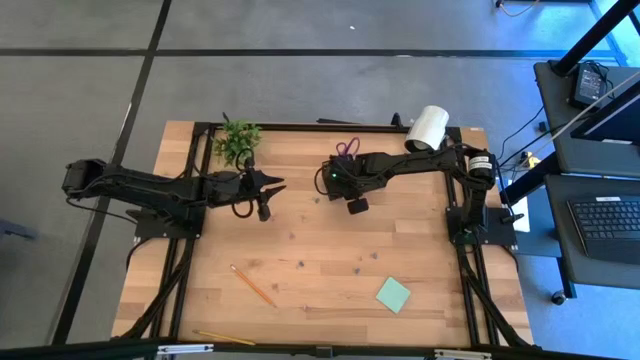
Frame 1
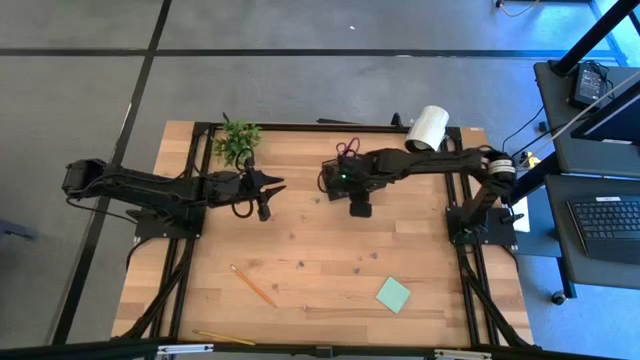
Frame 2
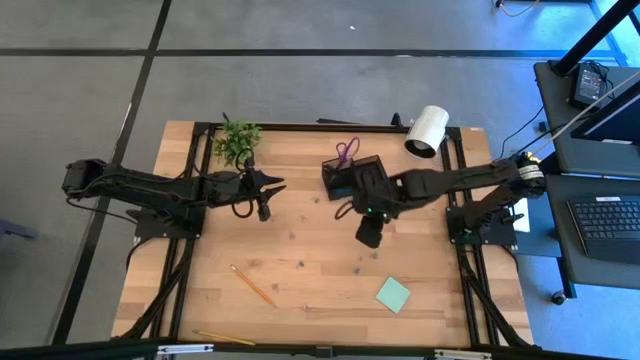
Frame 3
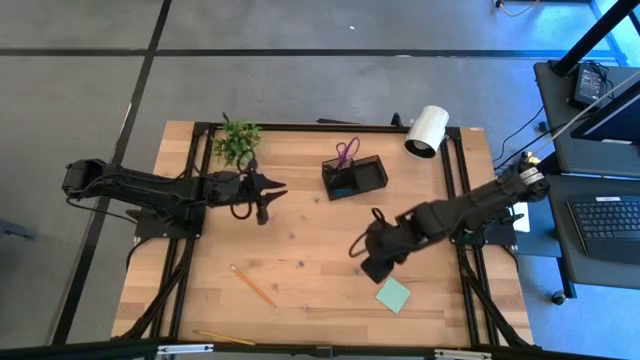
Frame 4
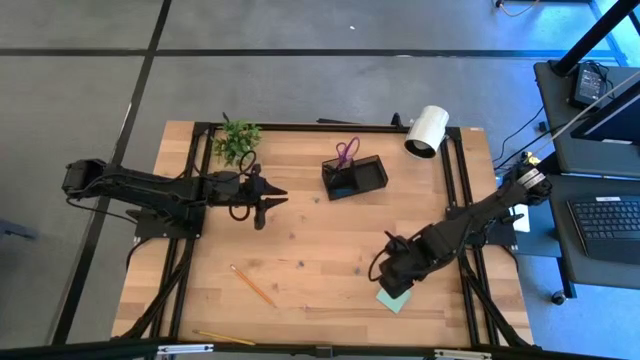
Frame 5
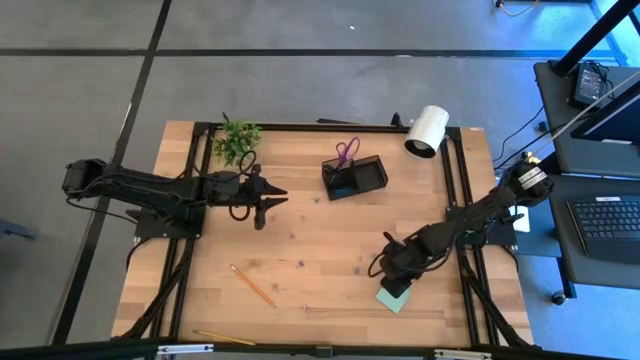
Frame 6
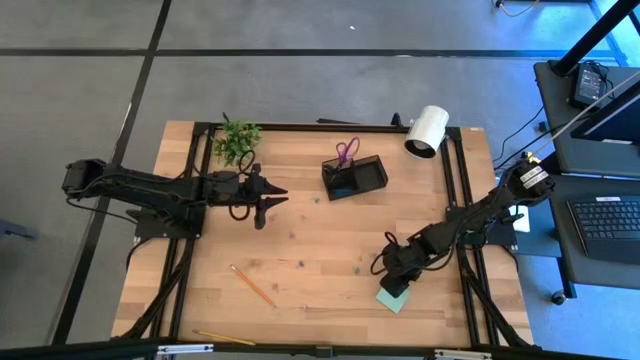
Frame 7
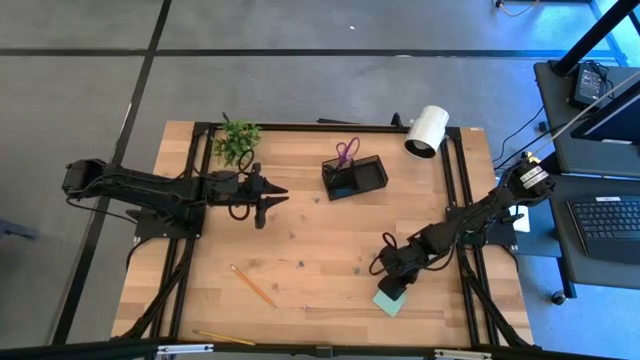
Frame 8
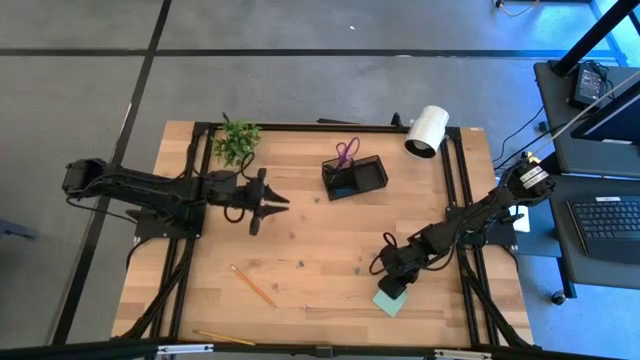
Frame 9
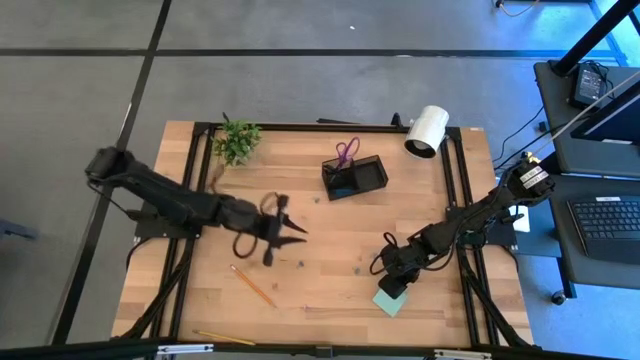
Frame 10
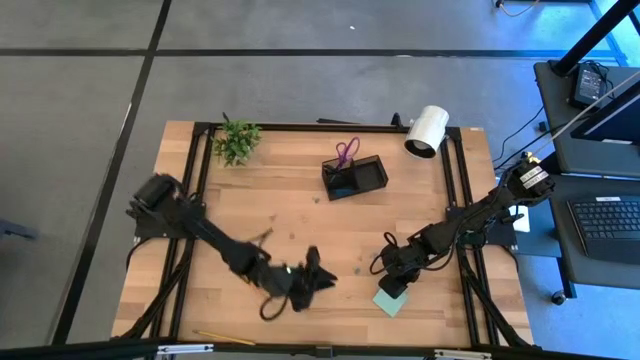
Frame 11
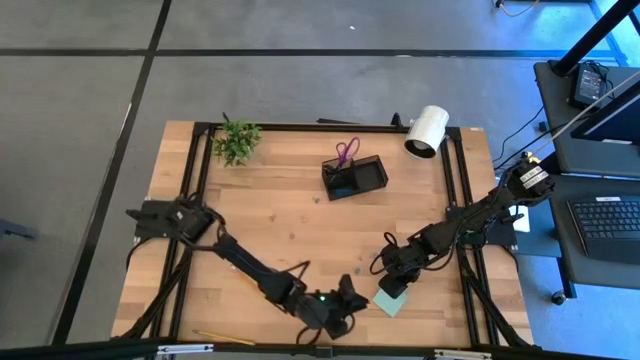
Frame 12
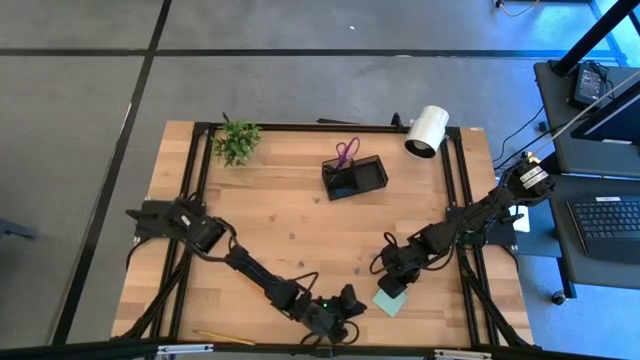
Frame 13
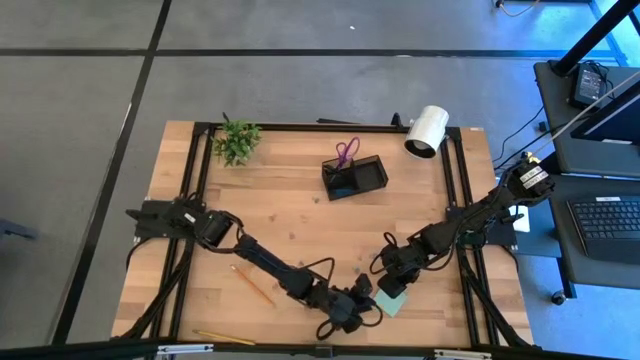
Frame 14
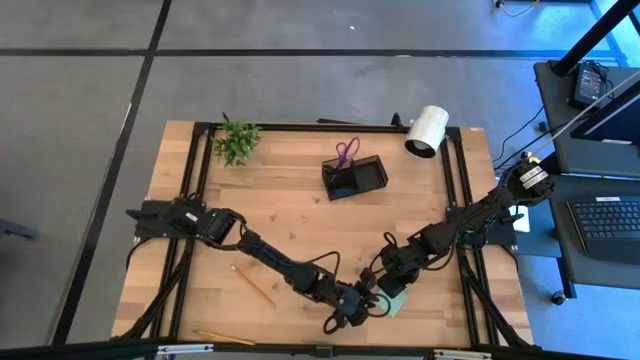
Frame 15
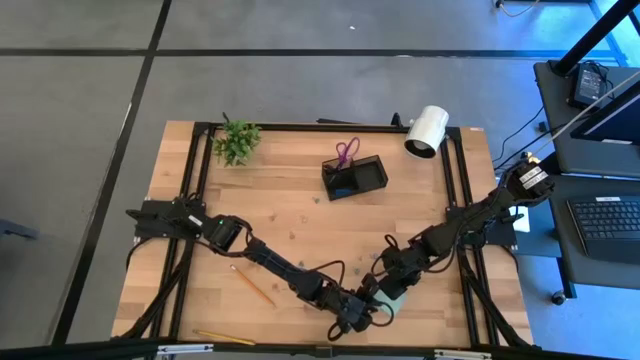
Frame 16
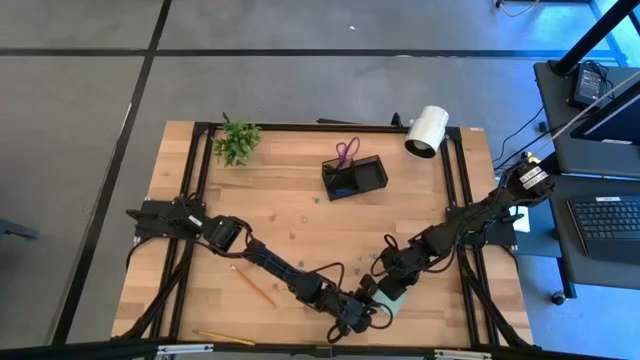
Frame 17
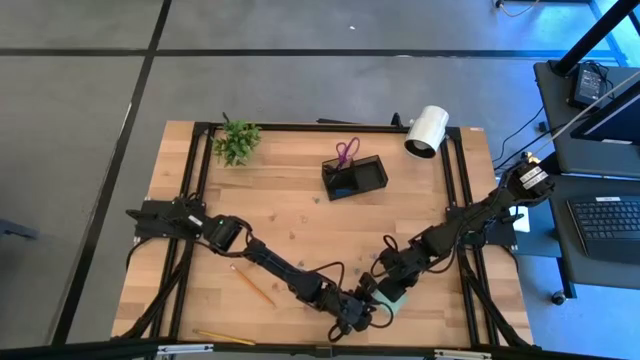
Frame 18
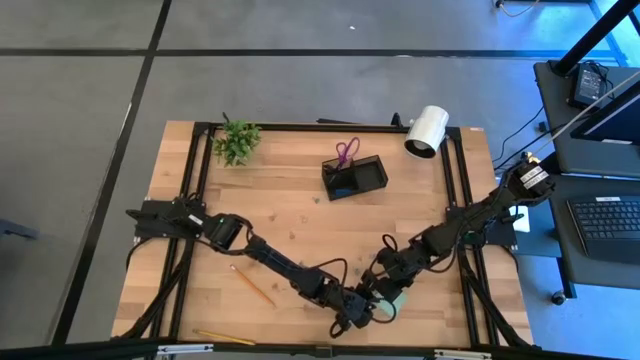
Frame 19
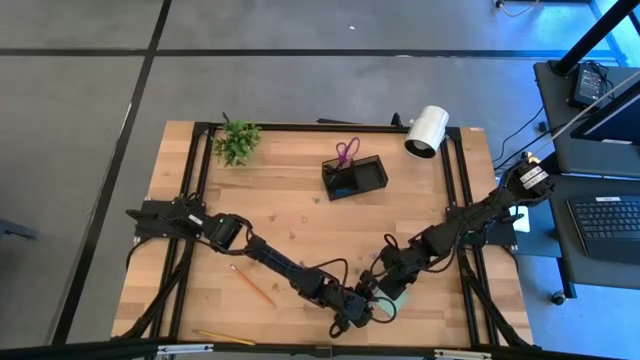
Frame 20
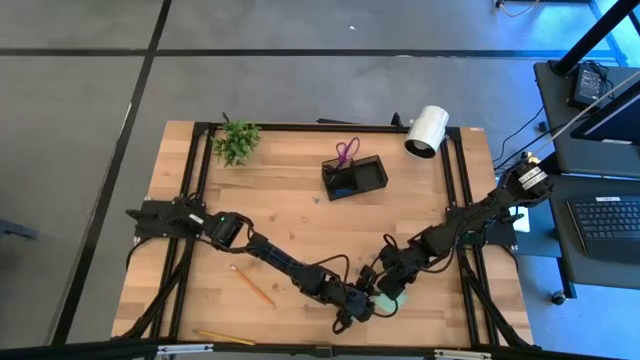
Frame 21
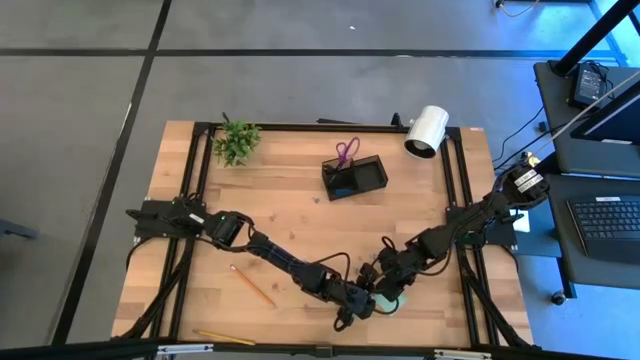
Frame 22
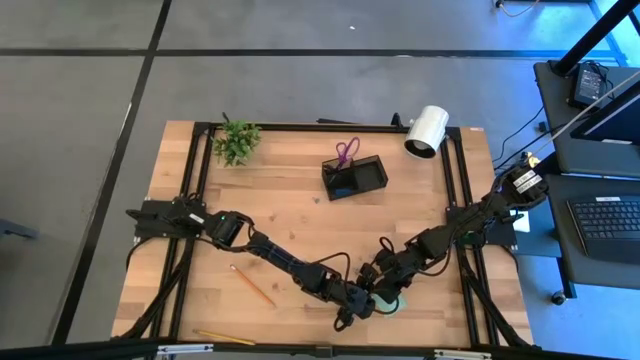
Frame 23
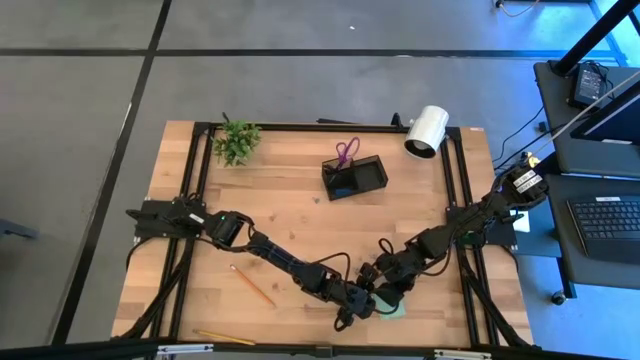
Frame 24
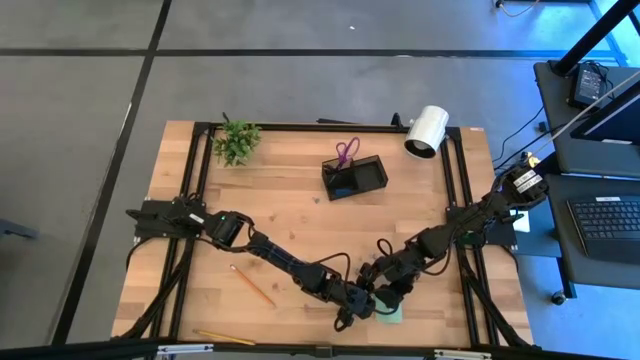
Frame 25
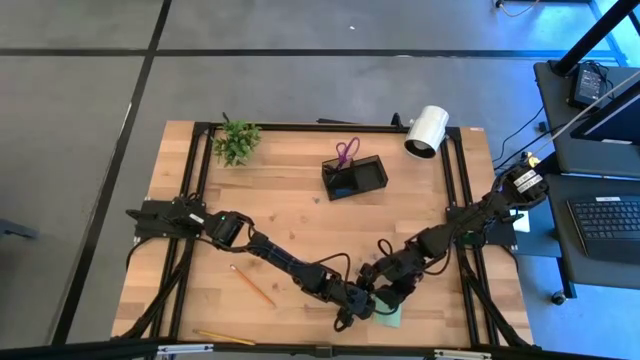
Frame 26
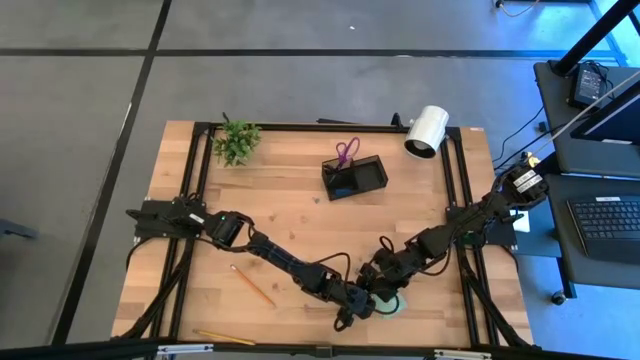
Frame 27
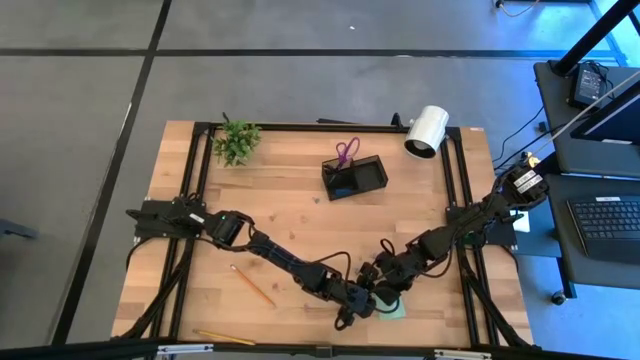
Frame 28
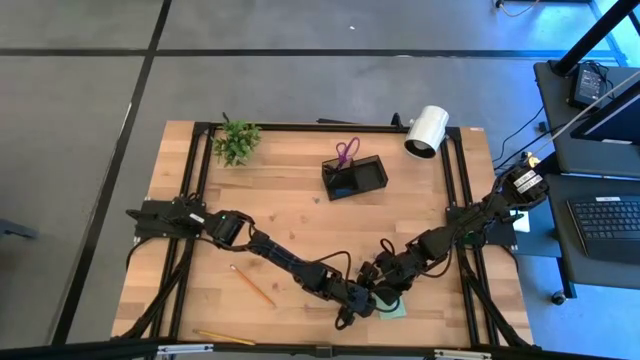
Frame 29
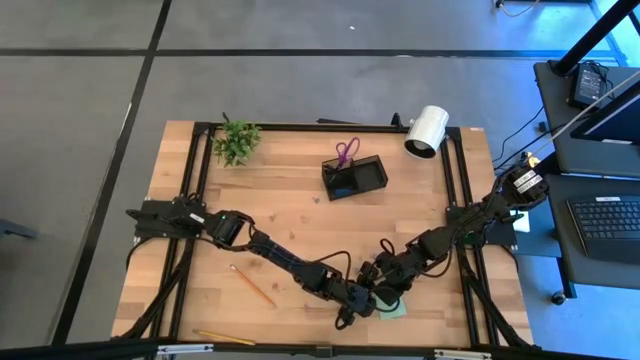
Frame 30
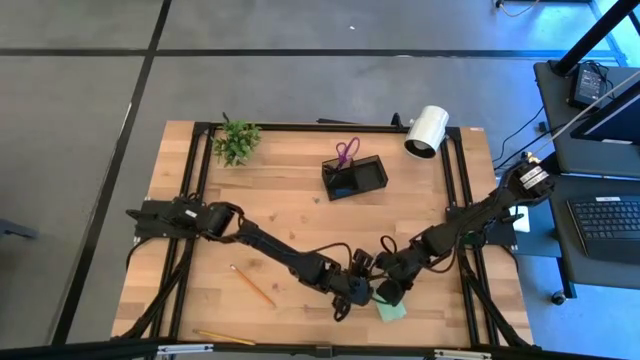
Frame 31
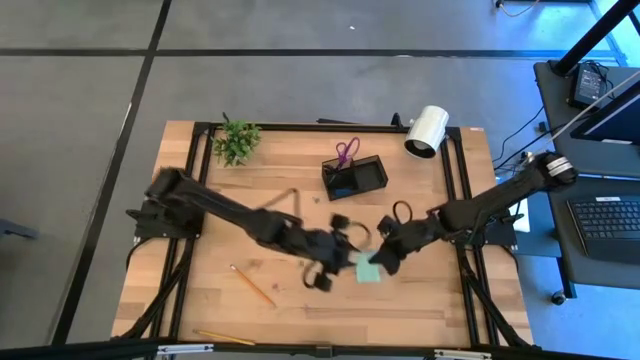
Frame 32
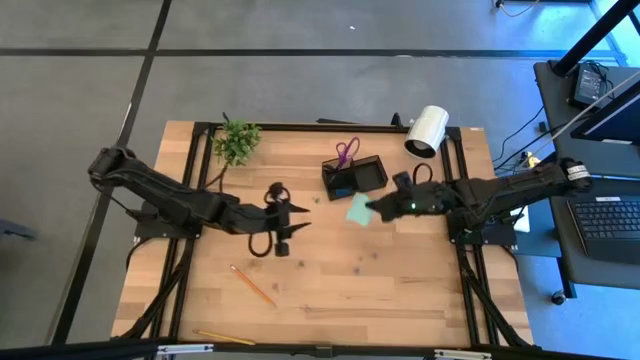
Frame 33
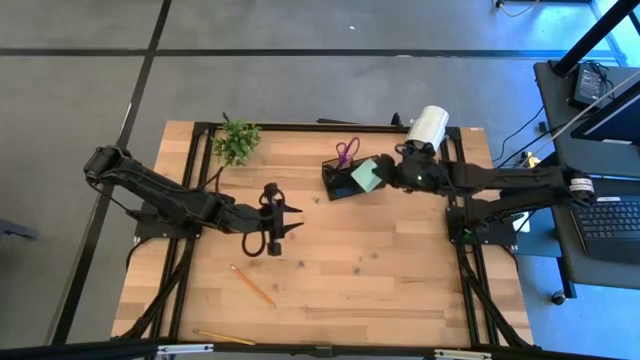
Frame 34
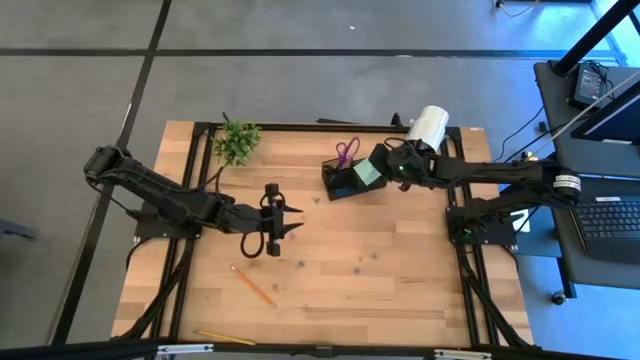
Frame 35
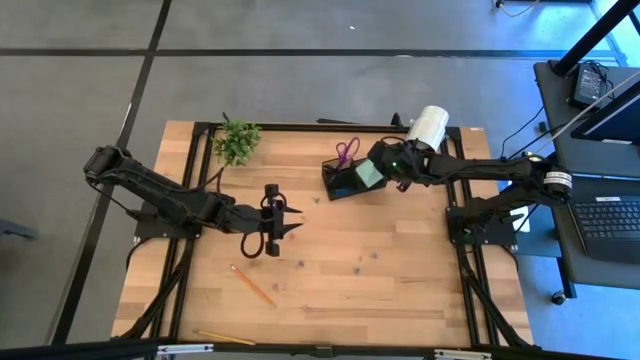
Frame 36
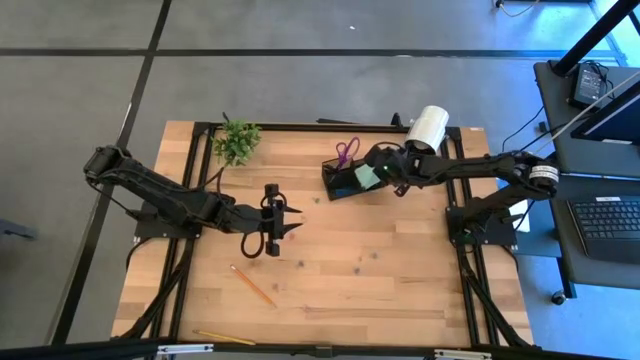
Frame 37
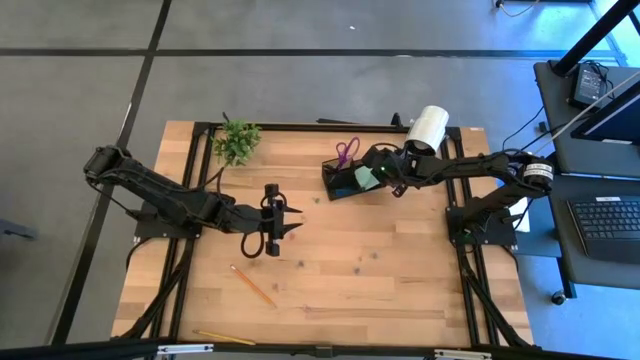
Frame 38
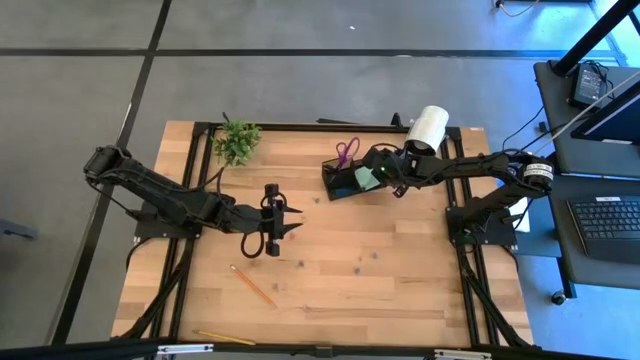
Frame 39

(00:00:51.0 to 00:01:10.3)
Task: Pick and place office supplies into organizer
Put the light blue sticky note into the black desk organizer
